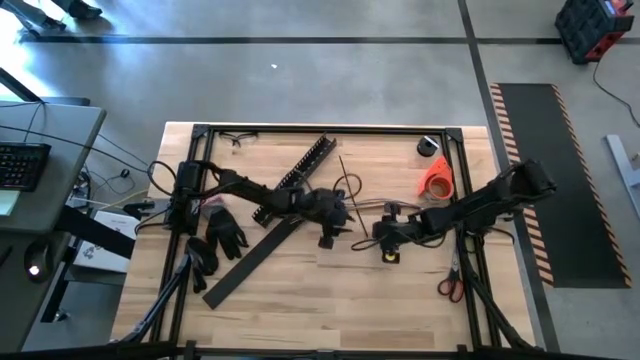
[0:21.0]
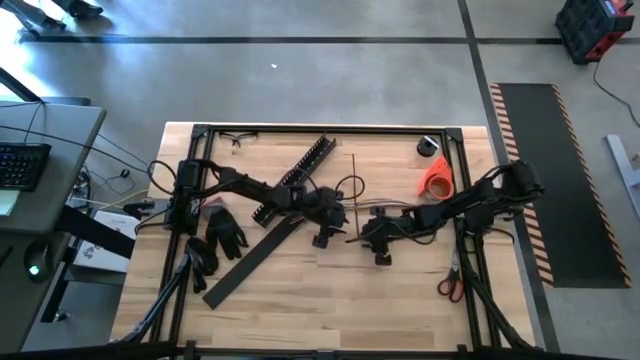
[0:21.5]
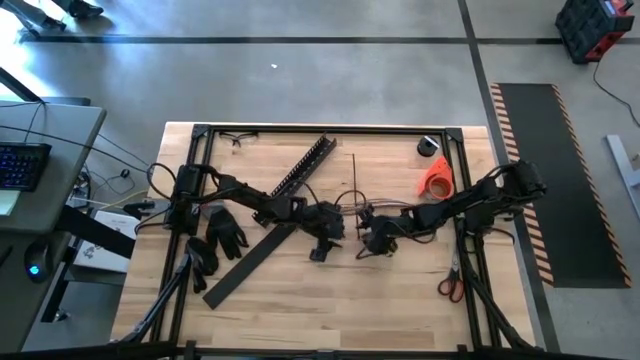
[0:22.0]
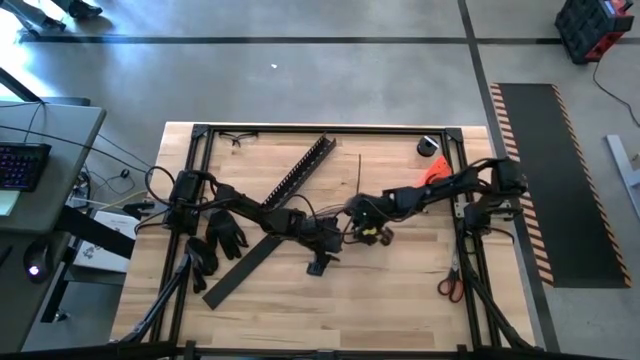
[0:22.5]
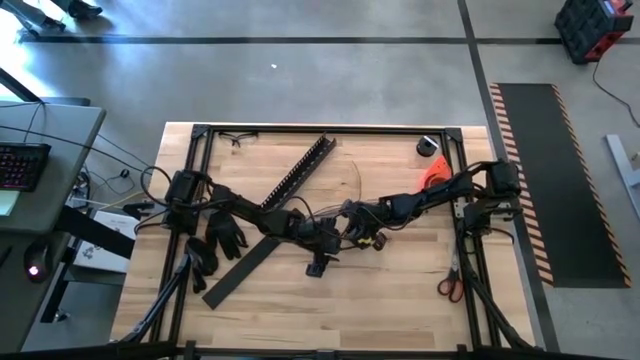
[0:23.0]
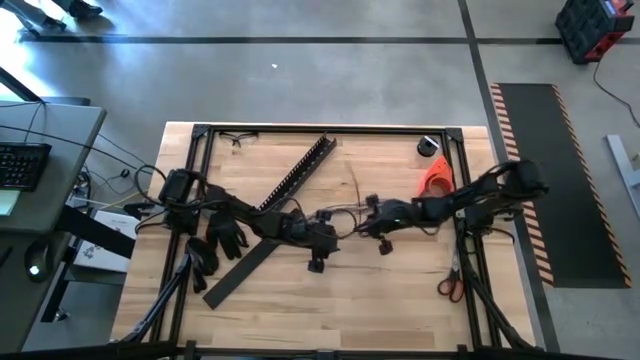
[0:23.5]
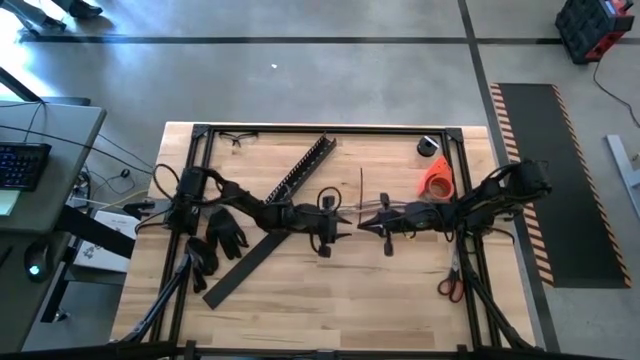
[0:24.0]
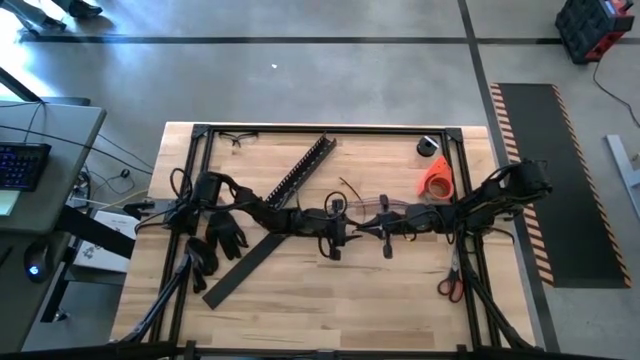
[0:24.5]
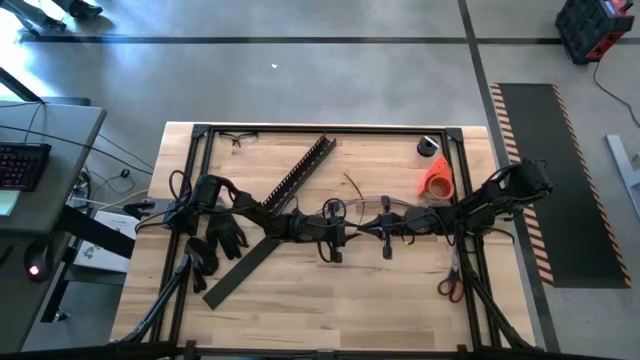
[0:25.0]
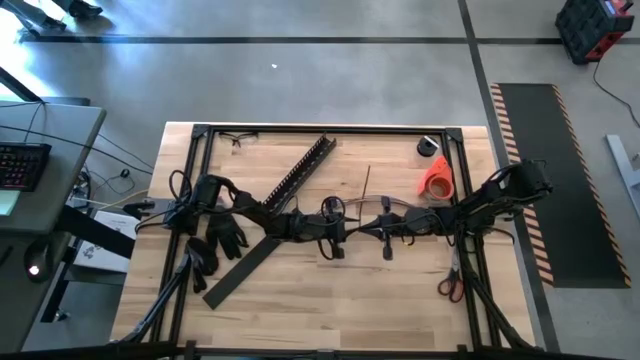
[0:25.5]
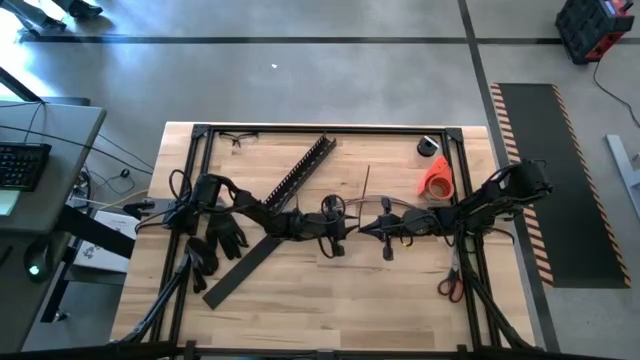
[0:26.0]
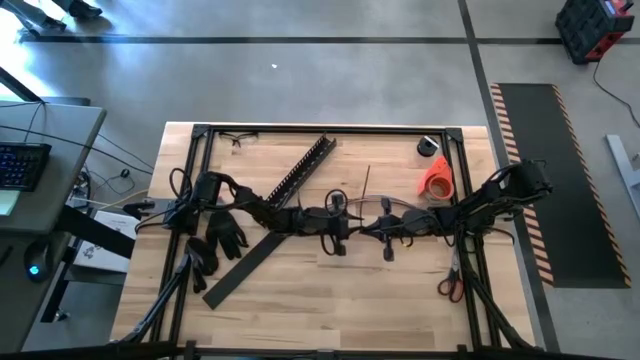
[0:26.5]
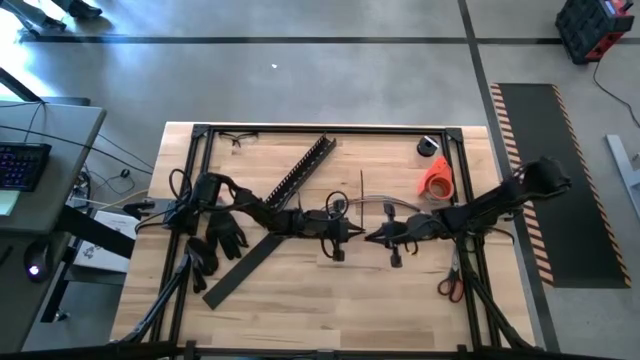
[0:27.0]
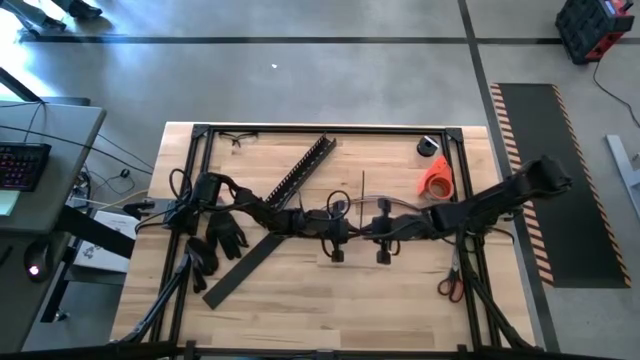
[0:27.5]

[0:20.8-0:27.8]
Task: Ziptie cables
Wrap the cables together using the black zip tie

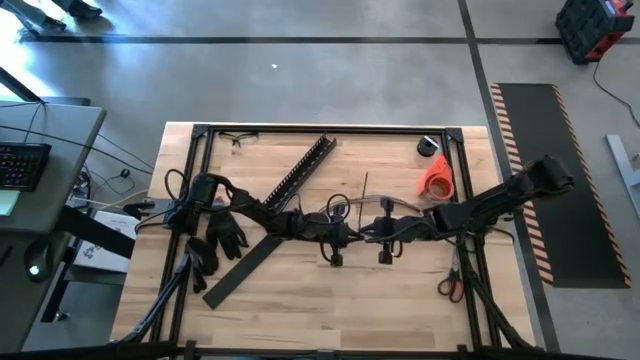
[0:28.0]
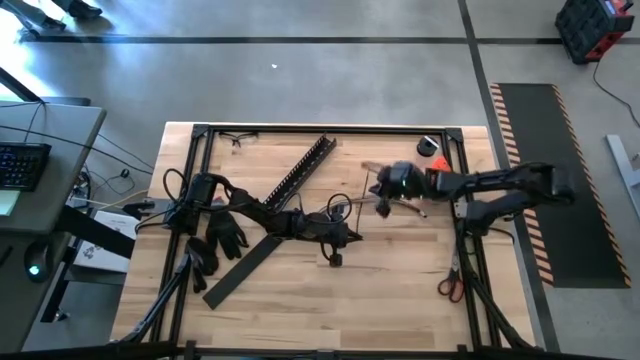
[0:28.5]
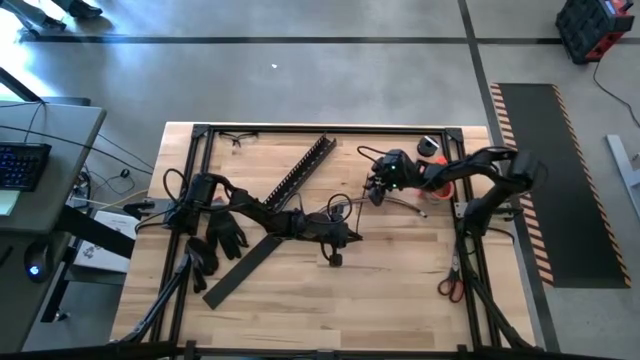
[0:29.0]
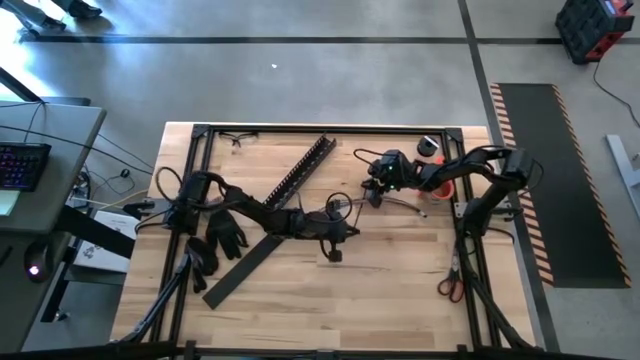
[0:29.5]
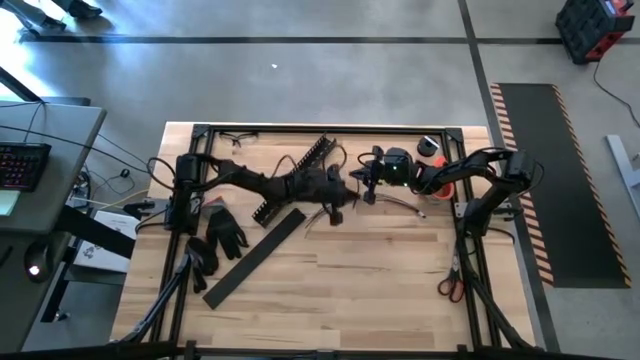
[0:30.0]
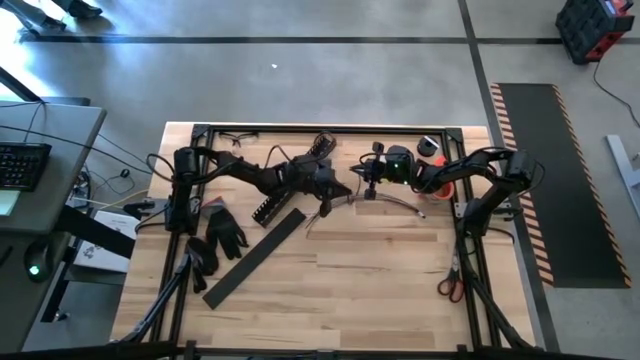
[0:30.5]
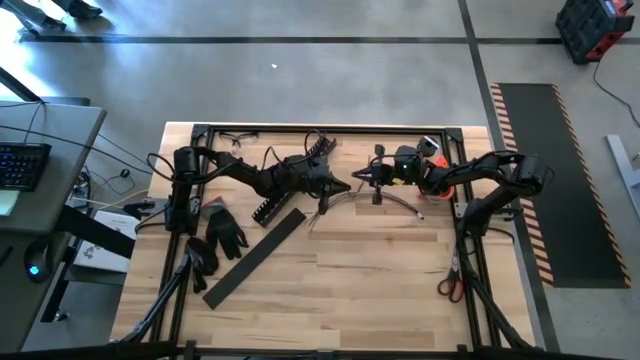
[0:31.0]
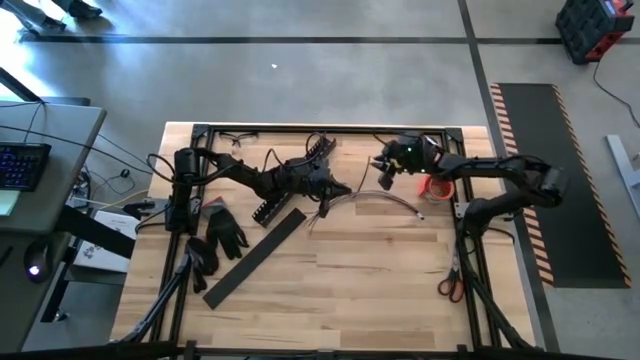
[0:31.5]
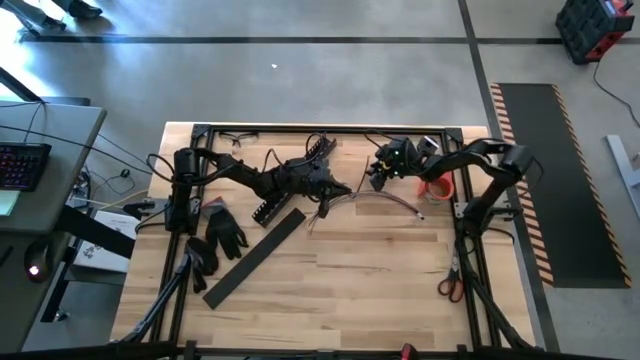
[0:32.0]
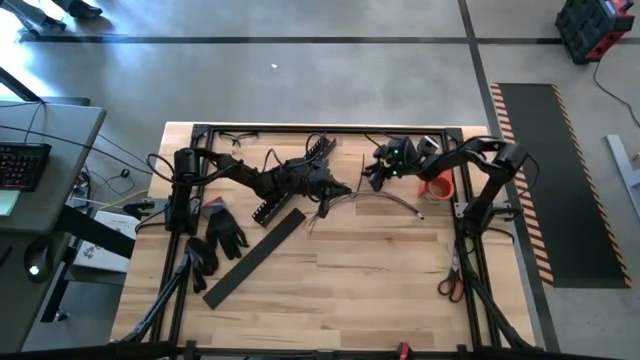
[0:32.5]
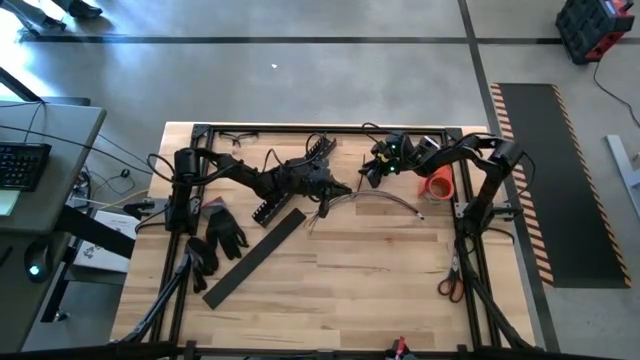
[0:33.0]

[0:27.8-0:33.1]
Wrap the cables together using the black zip tie

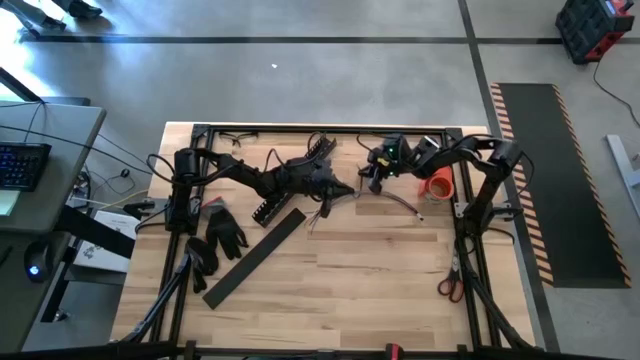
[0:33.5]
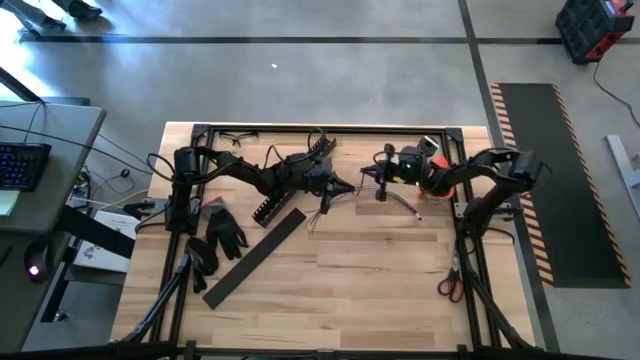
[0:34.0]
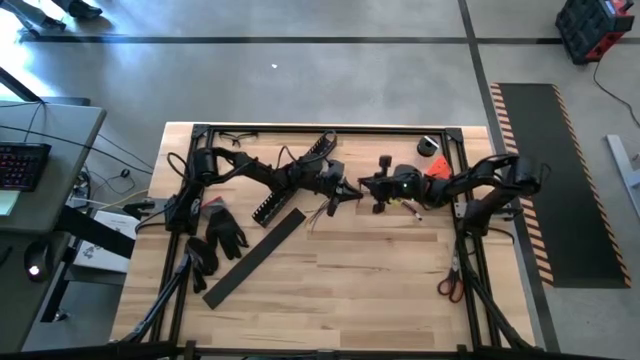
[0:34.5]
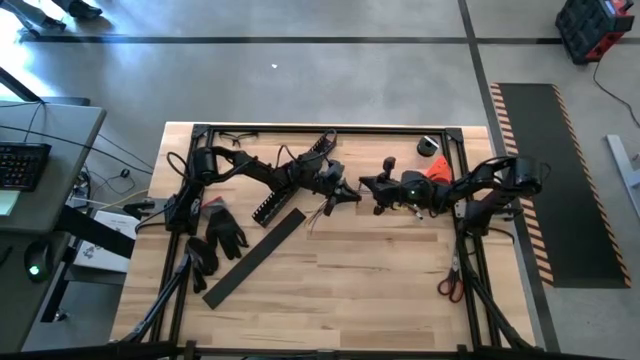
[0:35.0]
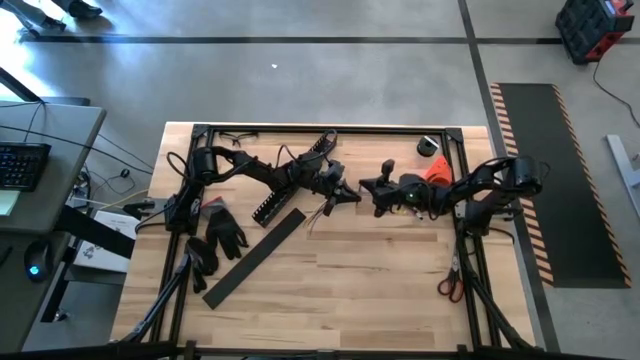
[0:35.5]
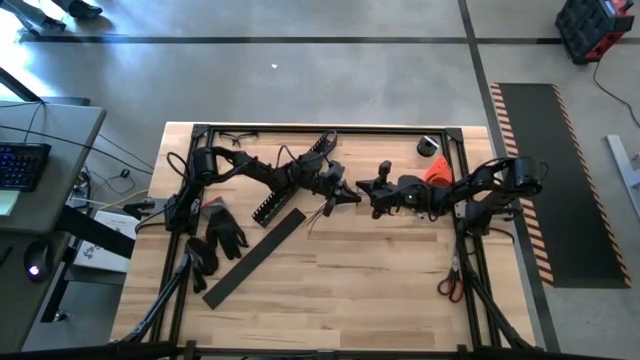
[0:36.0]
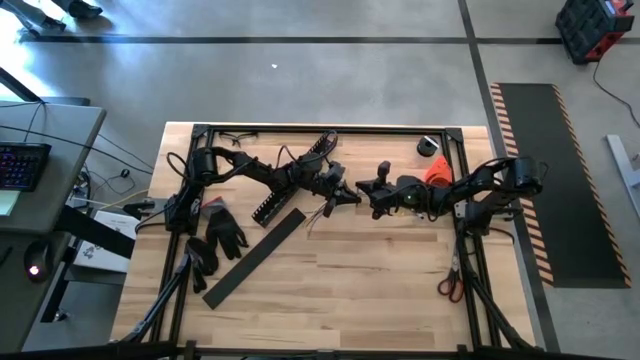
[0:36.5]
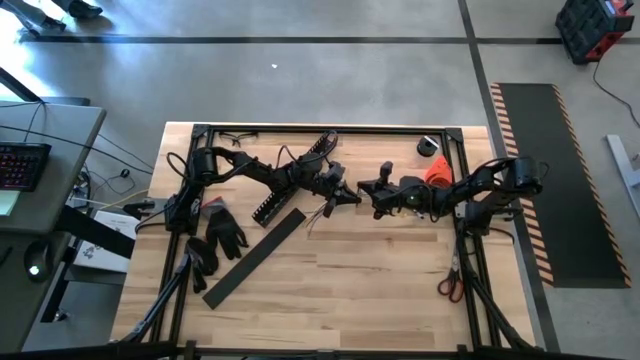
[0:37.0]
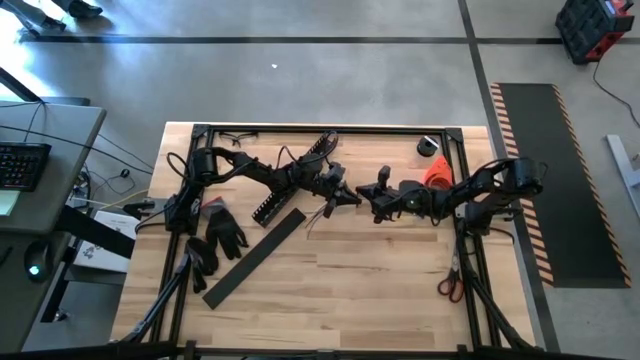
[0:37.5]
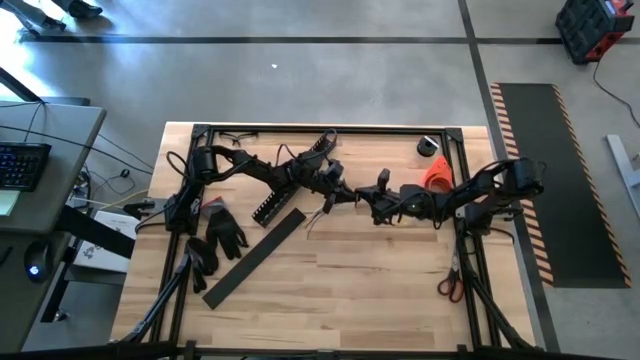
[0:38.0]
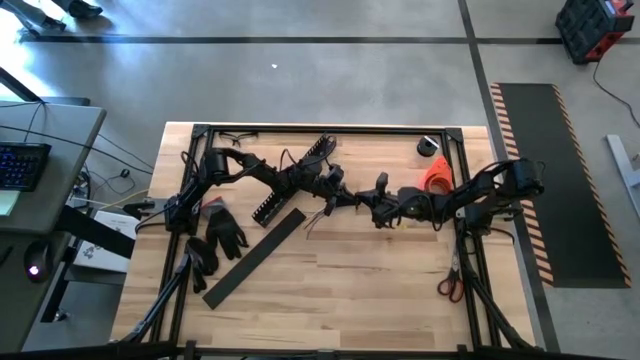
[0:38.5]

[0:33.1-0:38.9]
Wrap the cables together using the black zip tie

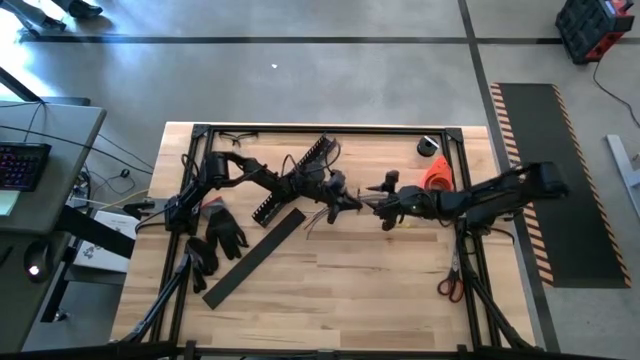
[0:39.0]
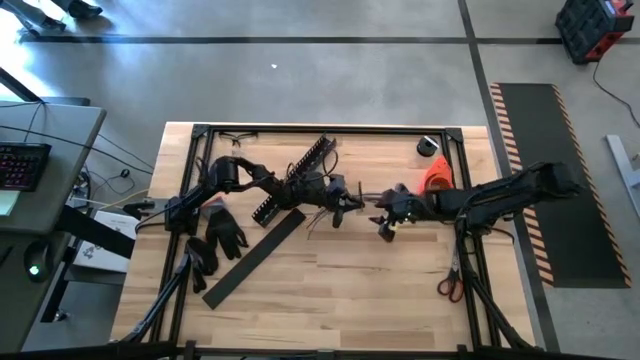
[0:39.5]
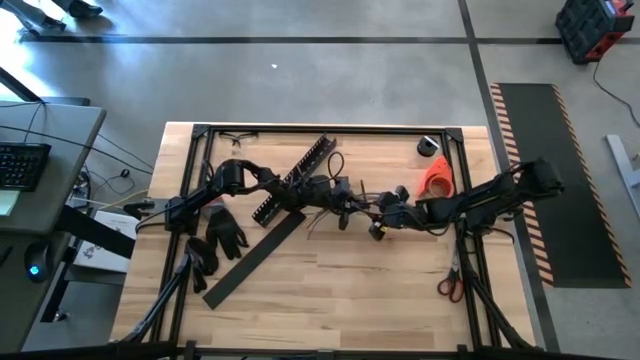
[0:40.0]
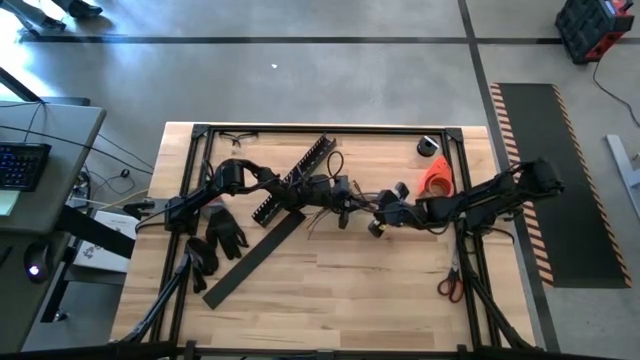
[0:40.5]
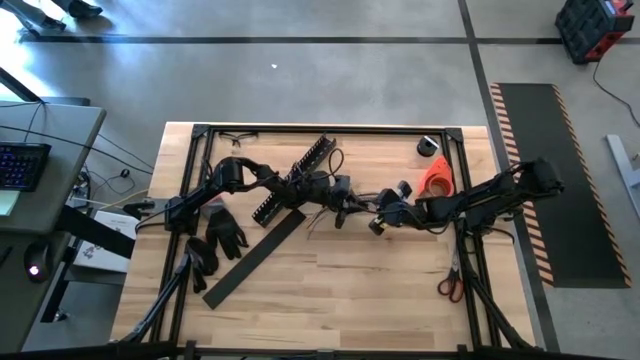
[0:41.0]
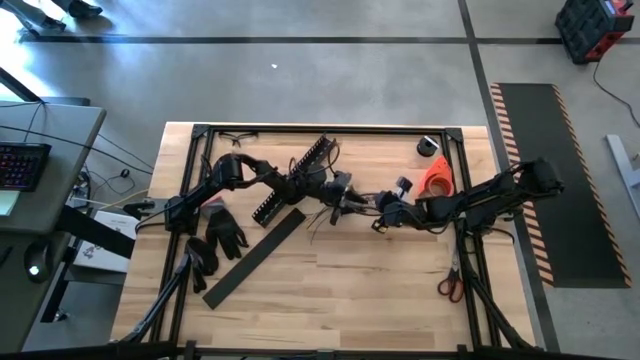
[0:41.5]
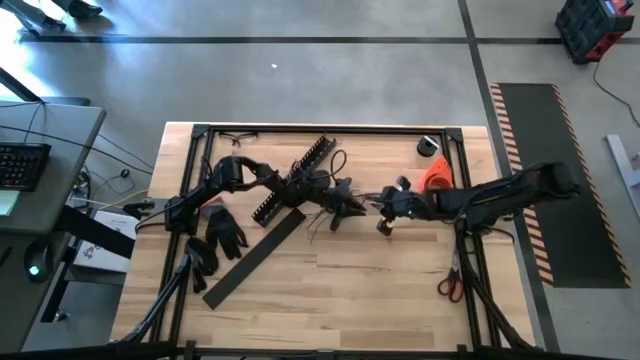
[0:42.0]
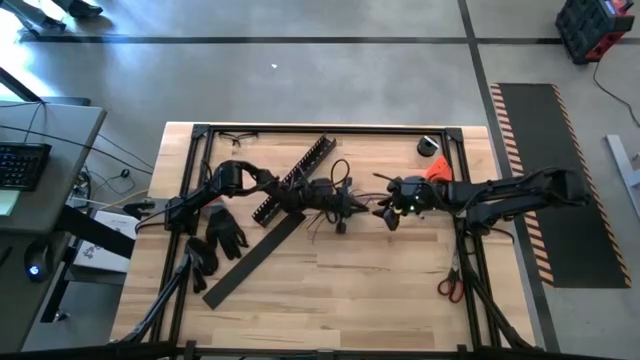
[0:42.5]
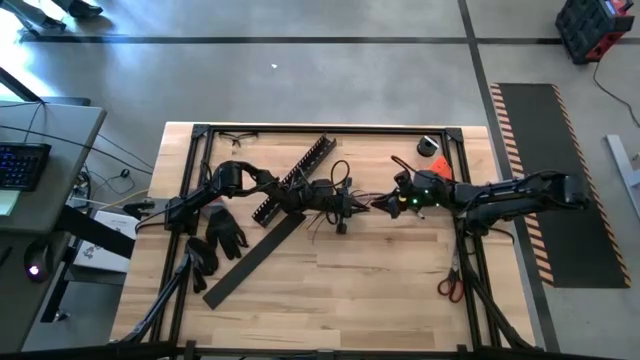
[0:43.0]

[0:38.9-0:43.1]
Wrap the cables together using the black zip tie
